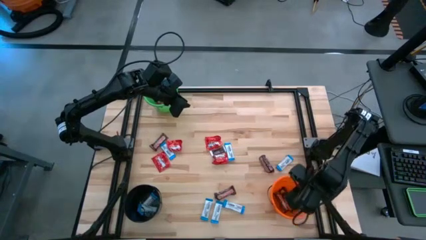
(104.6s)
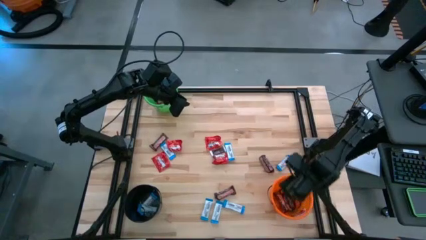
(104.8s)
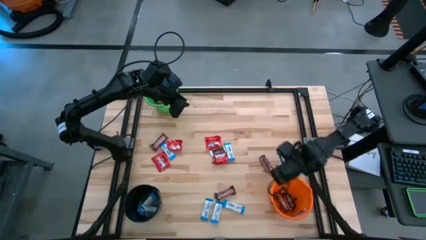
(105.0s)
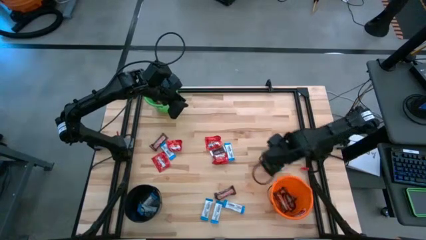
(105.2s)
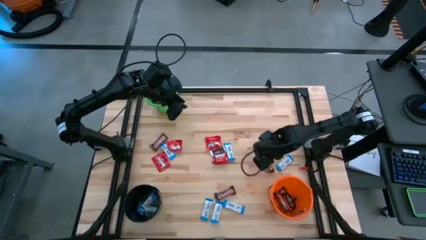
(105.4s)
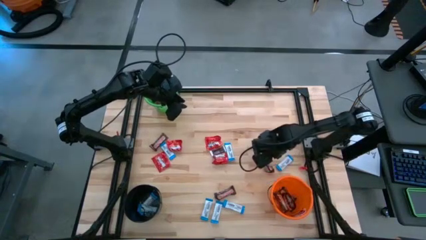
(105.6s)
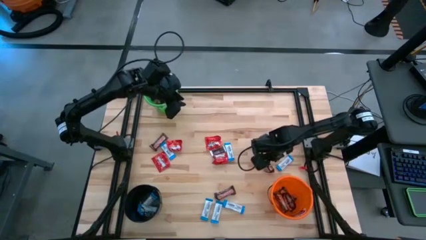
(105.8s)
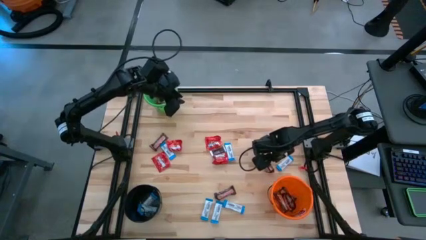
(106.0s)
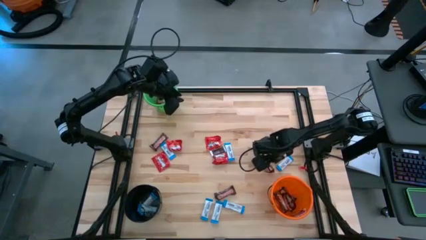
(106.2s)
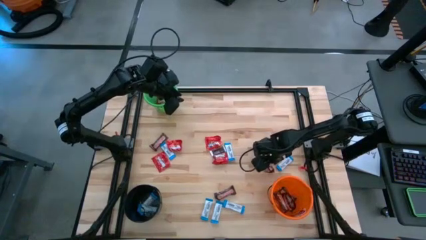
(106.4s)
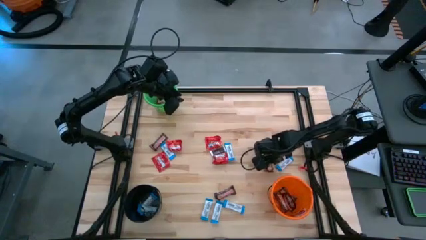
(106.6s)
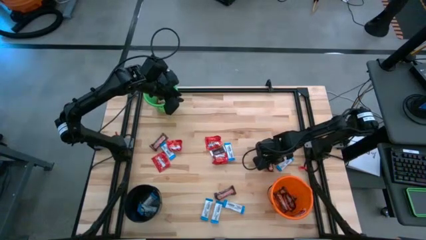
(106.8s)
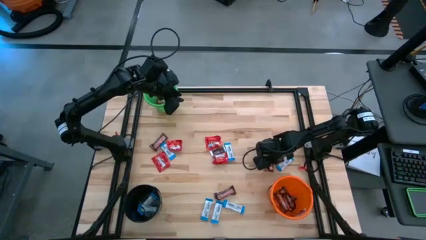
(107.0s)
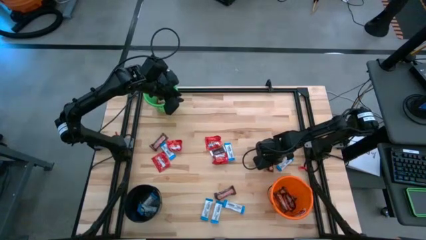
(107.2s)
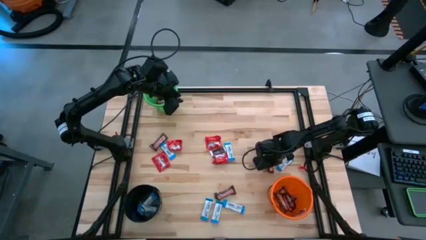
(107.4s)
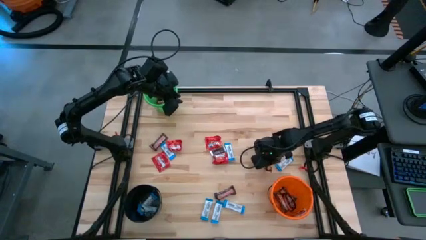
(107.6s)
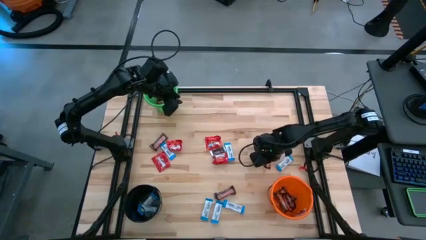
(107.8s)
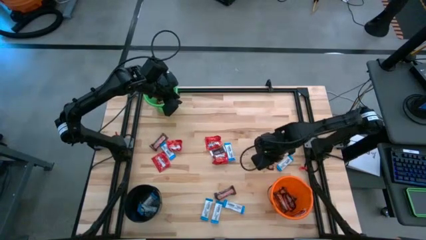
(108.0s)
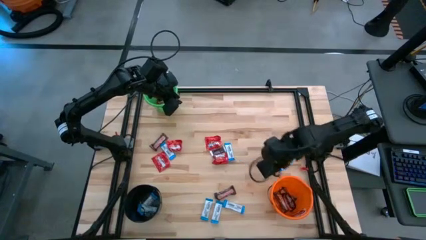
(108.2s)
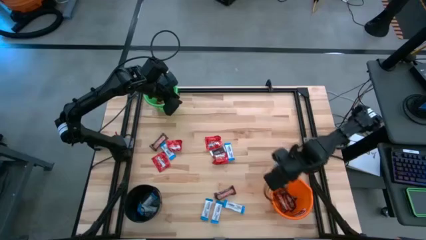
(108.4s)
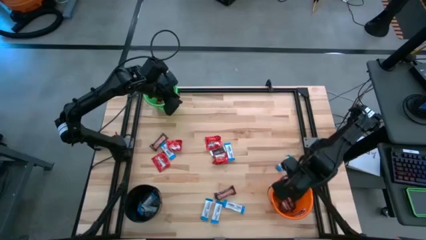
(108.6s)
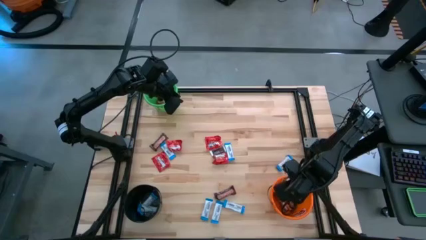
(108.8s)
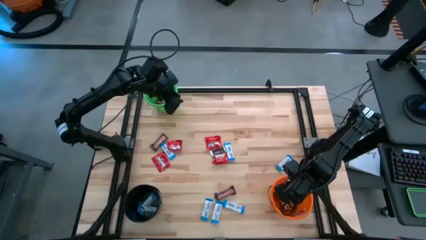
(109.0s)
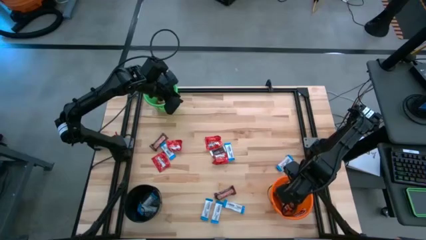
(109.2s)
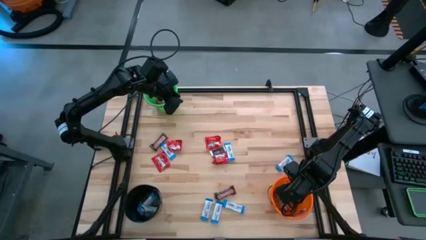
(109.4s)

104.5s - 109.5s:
Task: Sort candy
Put the brown chocolate into the orange bucket

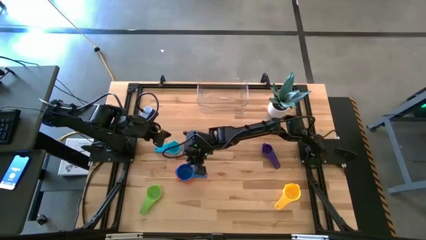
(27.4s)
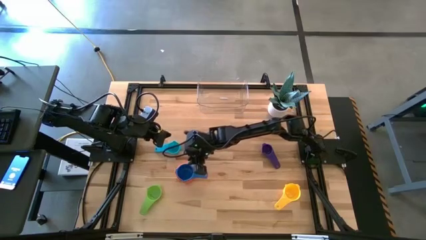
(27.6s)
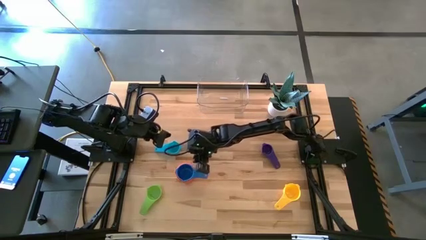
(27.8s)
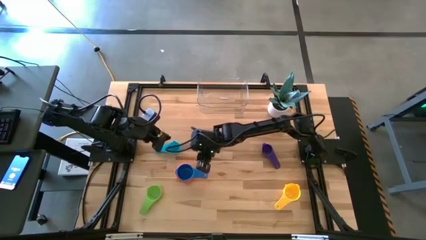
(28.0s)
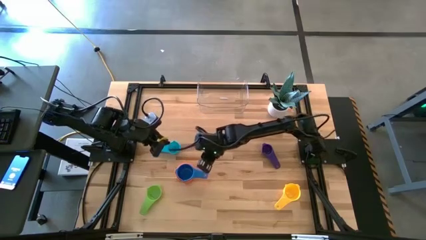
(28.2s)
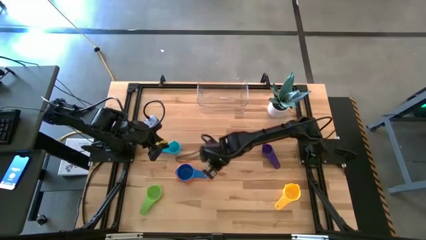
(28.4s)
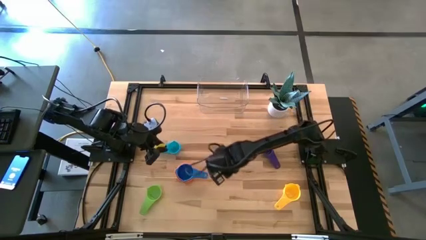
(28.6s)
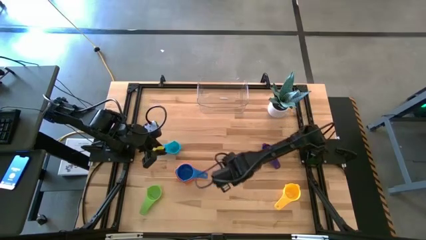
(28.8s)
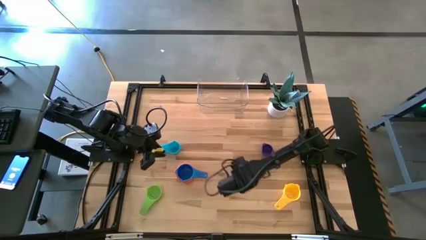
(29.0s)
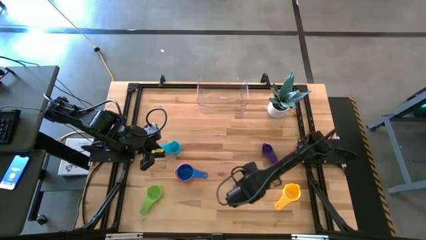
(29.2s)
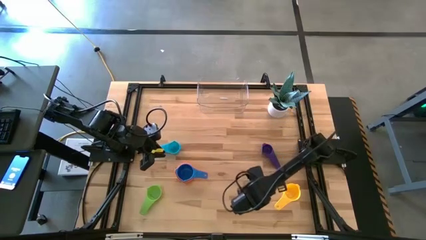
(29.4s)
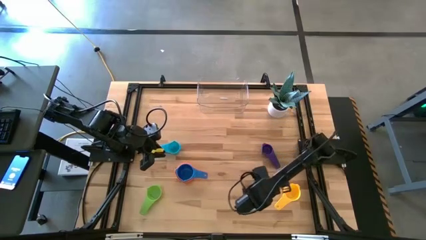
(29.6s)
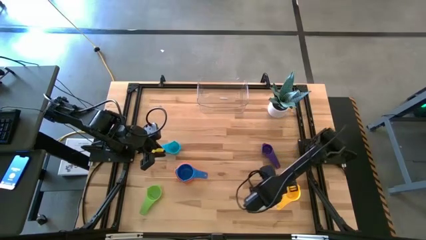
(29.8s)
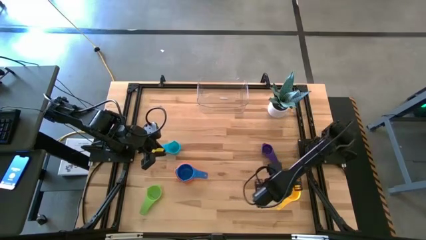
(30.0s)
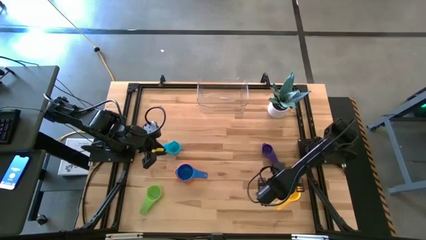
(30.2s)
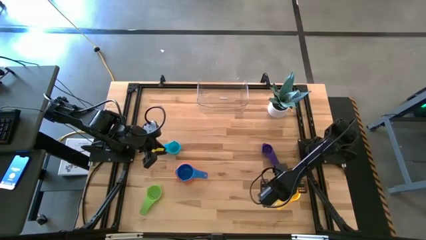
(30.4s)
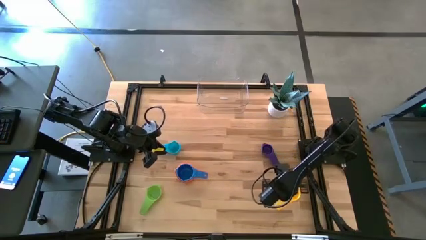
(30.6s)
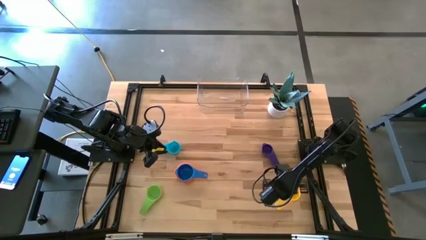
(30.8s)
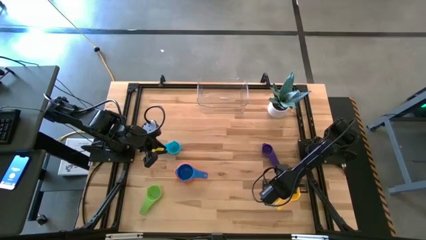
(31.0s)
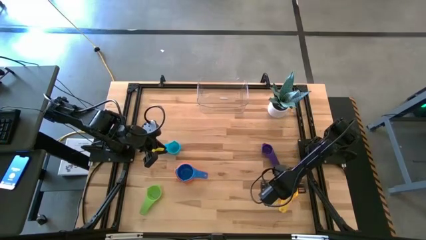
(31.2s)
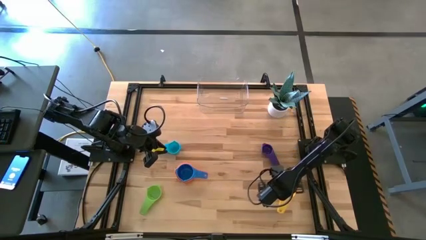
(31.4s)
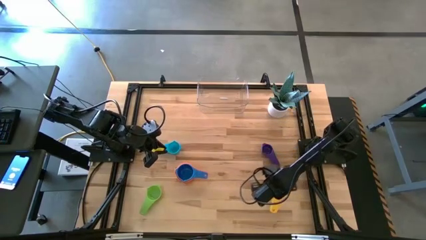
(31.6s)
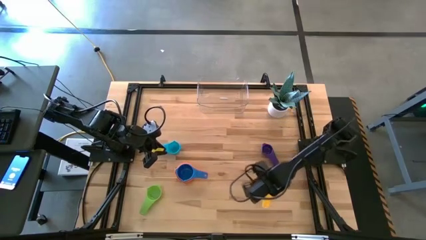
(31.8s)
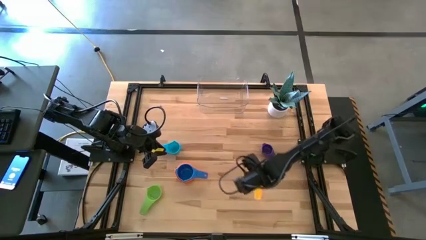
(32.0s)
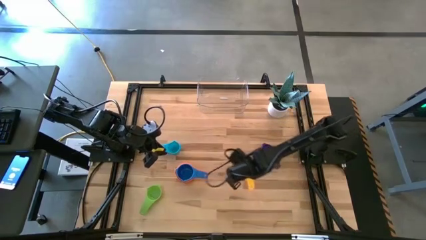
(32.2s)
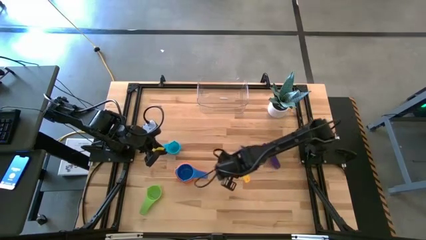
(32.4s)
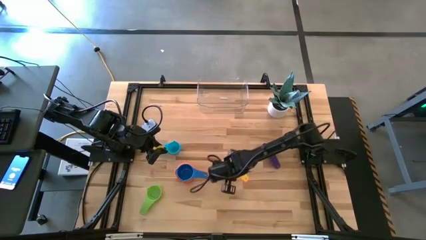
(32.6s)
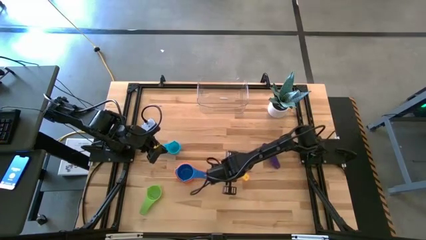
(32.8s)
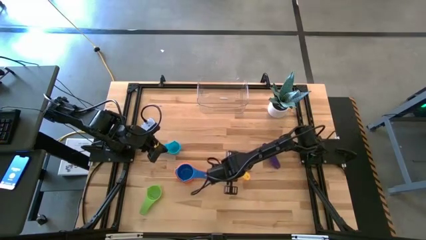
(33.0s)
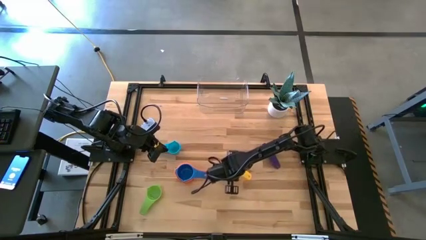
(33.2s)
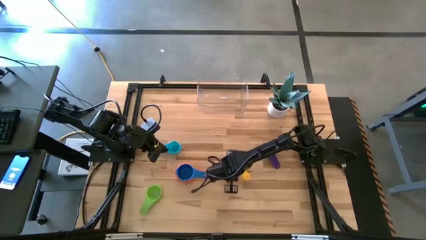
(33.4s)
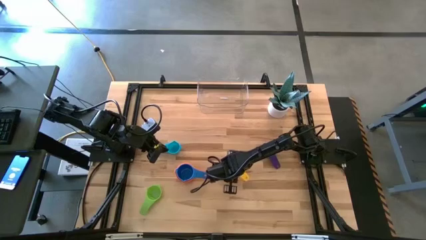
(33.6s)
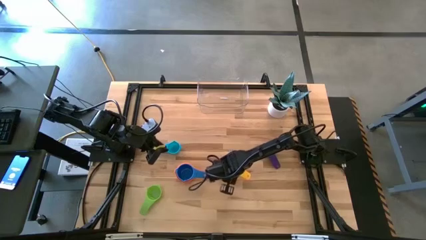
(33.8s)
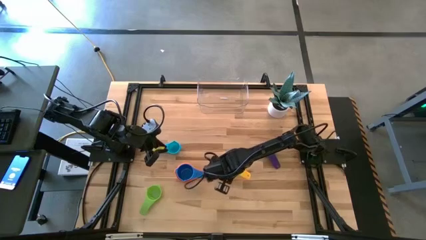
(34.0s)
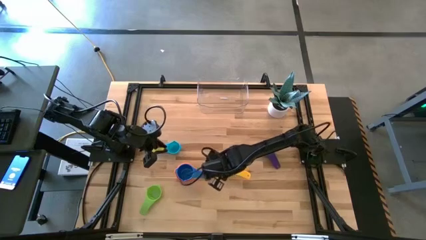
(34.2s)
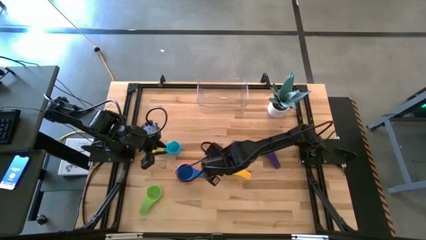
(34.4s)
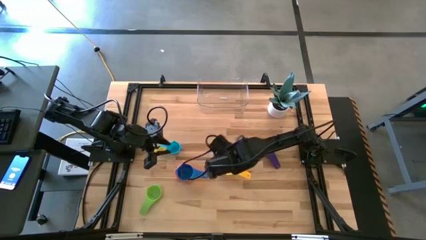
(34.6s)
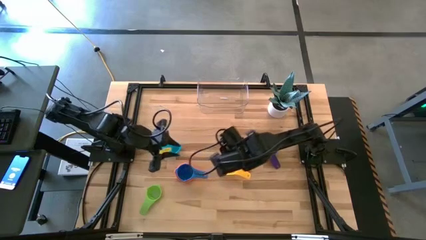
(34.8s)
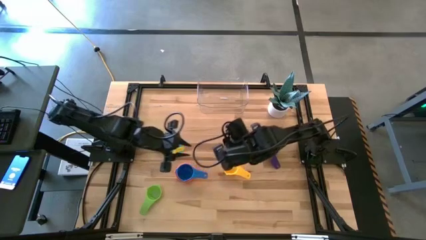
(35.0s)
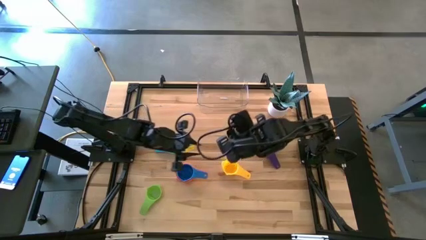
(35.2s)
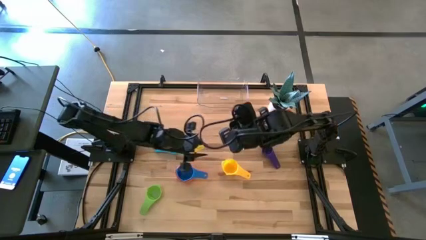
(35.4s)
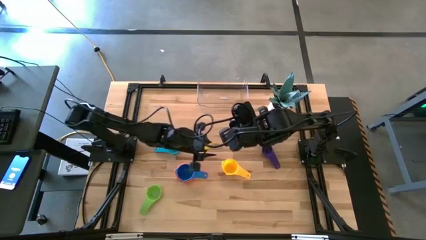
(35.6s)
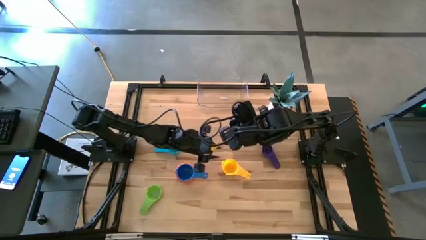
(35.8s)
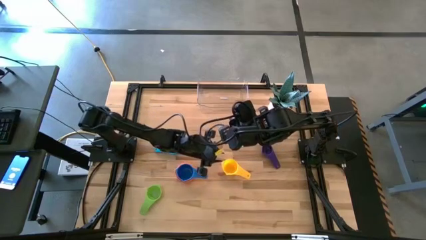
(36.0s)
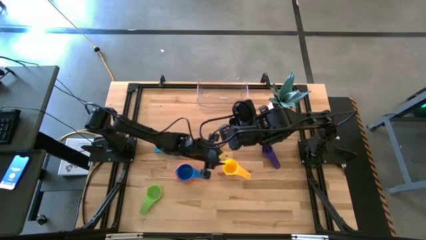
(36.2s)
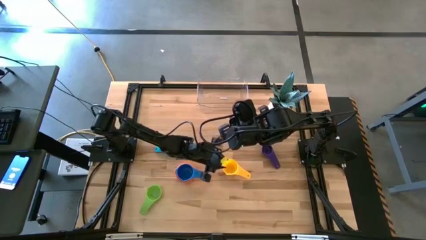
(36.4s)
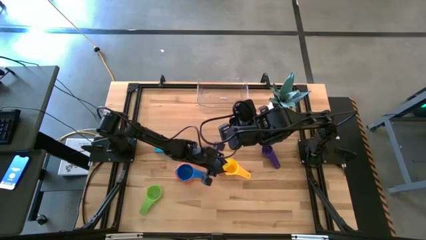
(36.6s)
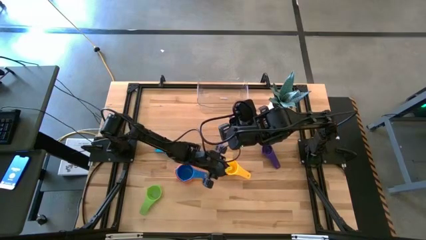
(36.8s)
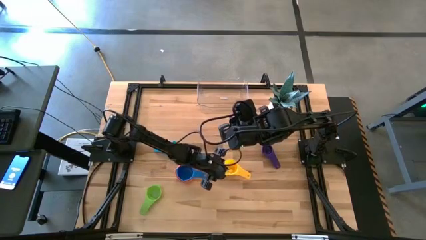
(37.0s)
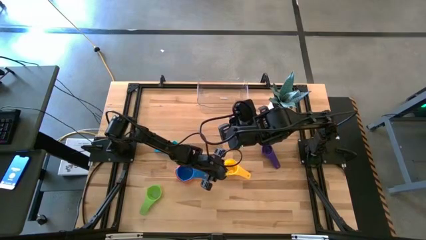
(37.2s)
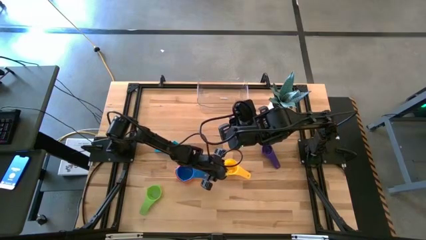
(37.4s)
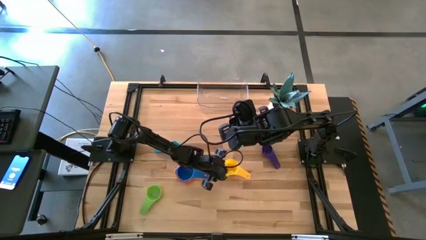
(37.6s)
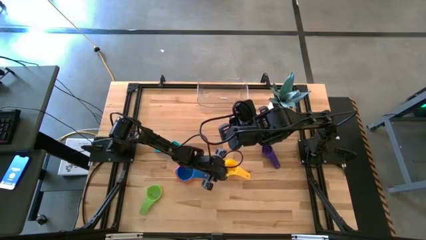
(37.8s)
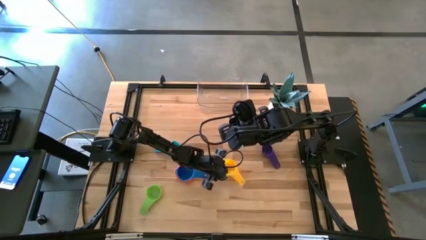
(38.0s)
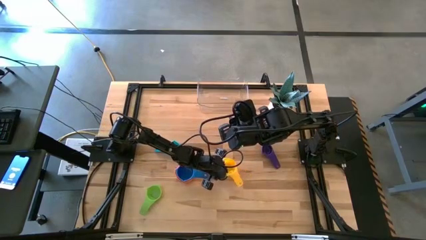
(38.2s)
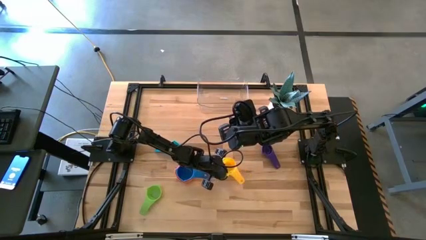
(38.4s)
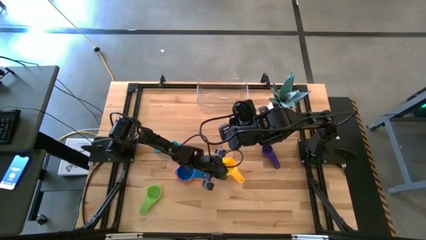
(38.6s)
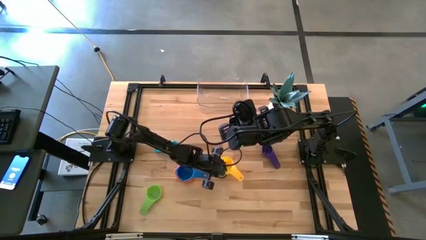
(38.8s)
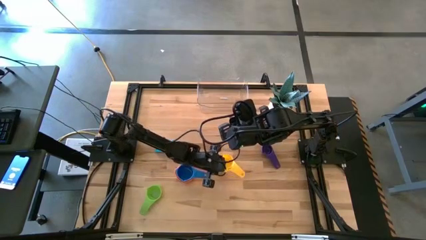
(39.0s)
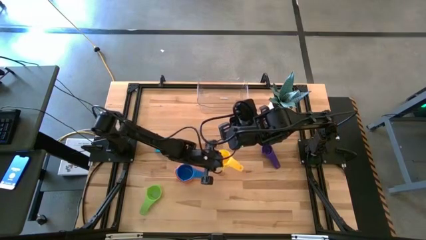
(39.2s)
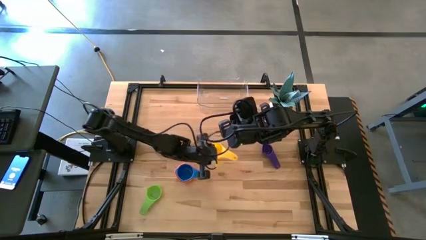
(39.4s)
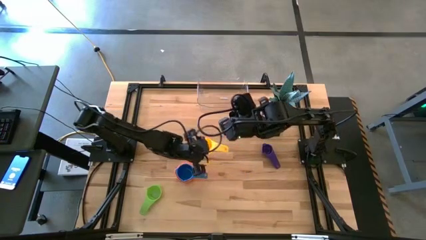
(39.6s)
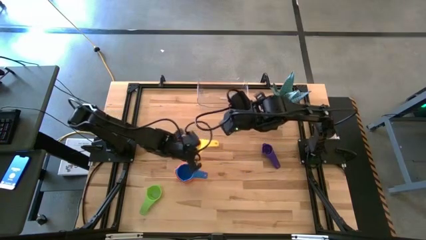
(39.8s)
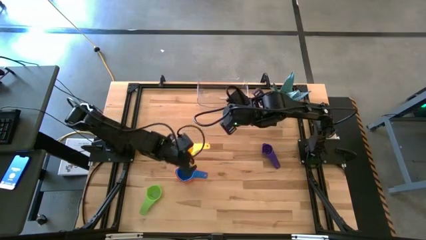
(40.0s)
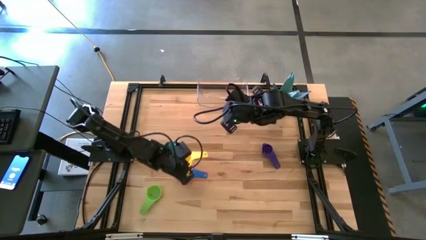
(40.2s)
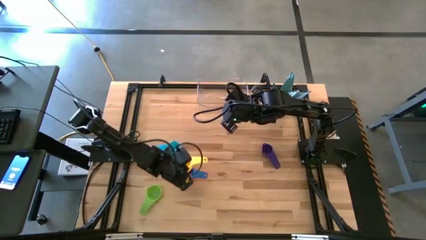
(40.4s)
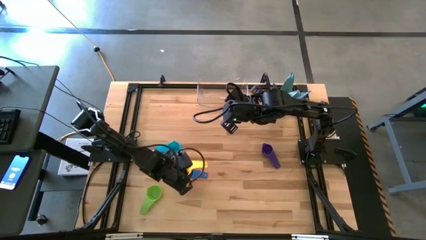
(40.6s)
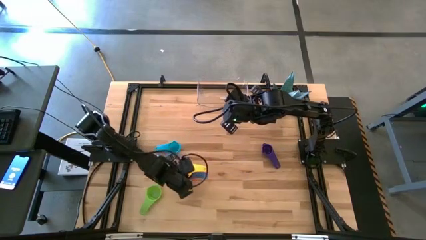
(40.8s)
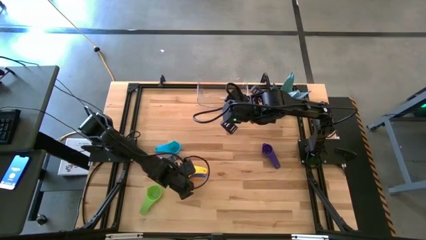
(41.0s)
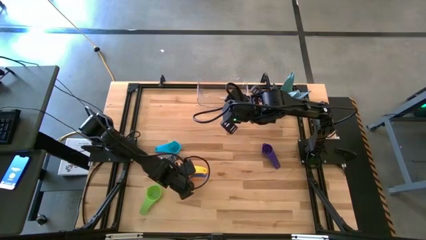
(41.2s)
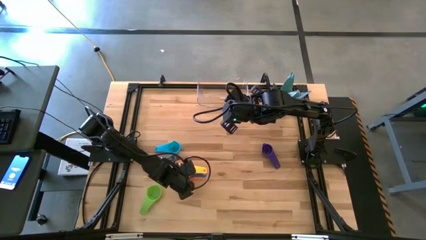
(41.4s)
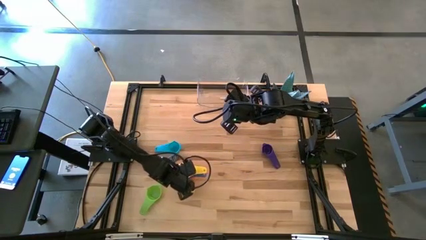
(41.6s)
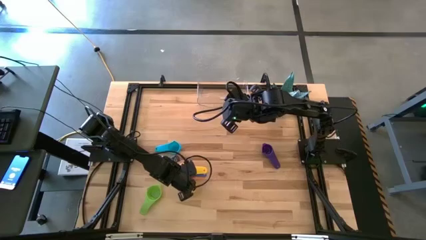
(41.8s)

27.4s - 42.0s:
Task: Nest measuring cups in basket
Stack the yellow measuring cup on top of the blue measuring cup
